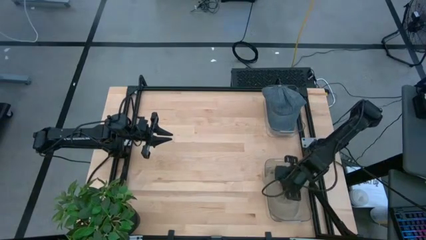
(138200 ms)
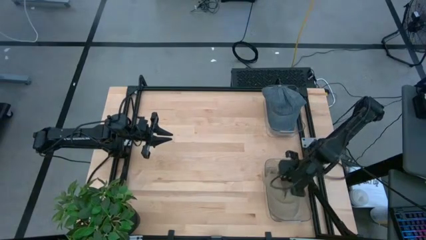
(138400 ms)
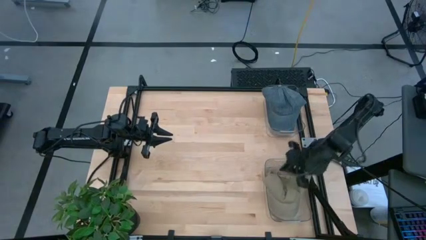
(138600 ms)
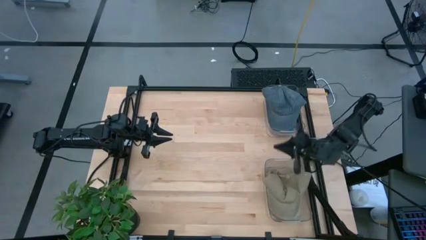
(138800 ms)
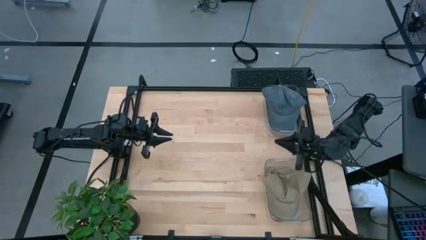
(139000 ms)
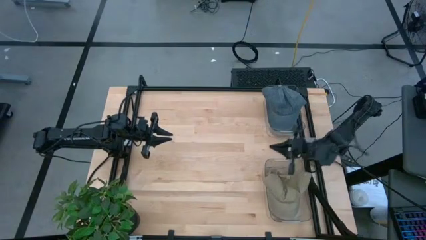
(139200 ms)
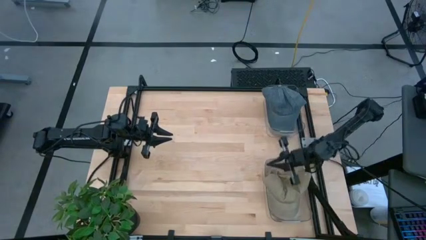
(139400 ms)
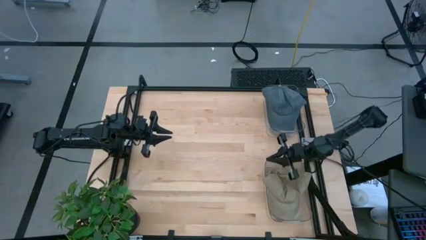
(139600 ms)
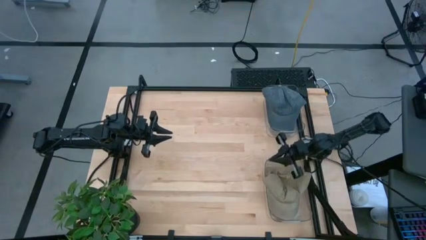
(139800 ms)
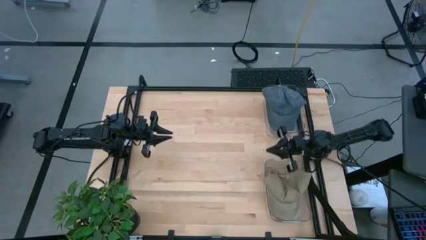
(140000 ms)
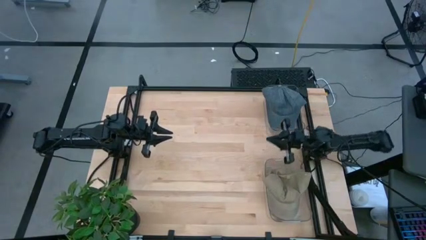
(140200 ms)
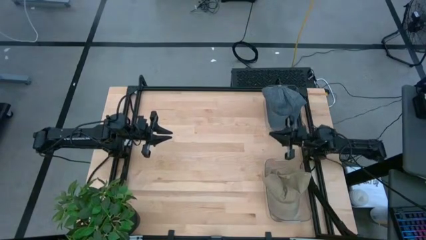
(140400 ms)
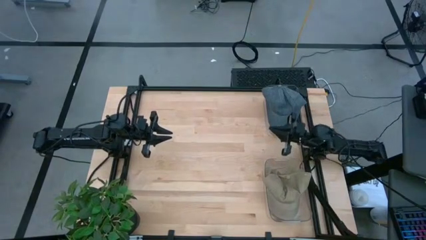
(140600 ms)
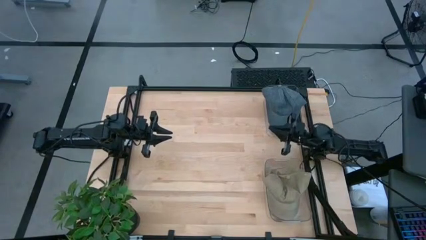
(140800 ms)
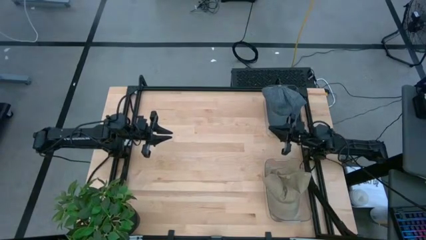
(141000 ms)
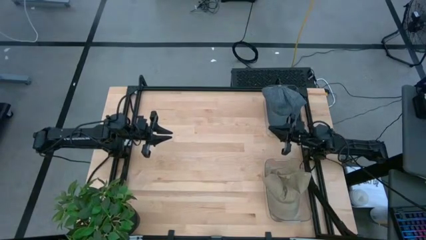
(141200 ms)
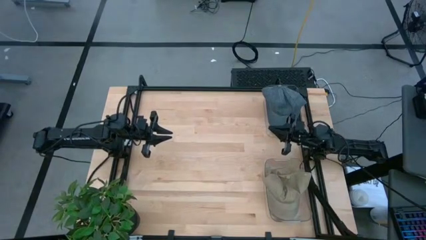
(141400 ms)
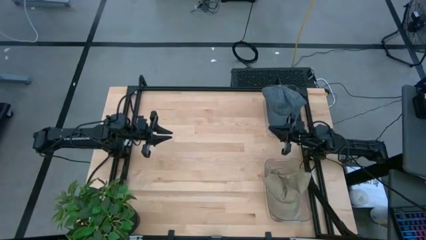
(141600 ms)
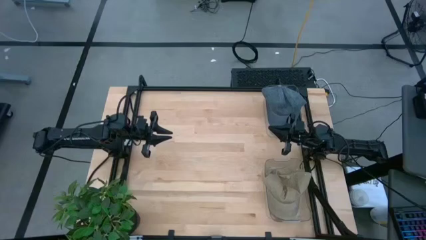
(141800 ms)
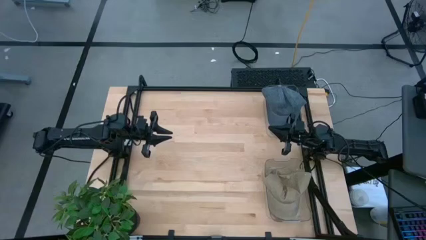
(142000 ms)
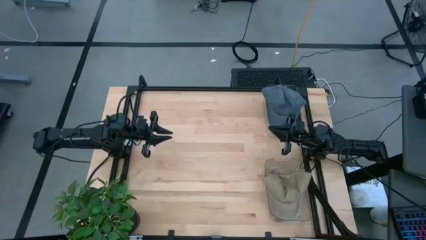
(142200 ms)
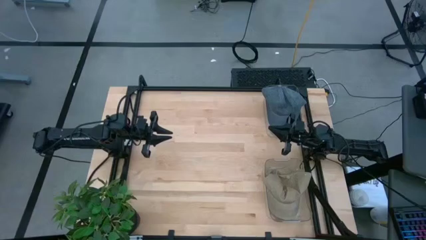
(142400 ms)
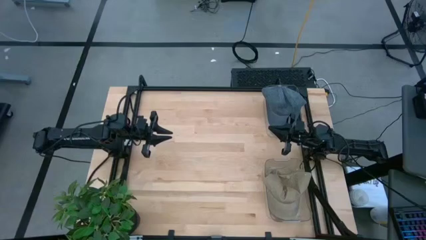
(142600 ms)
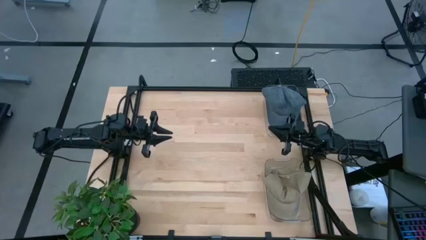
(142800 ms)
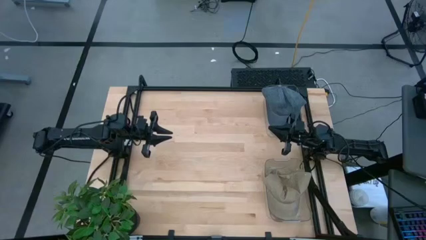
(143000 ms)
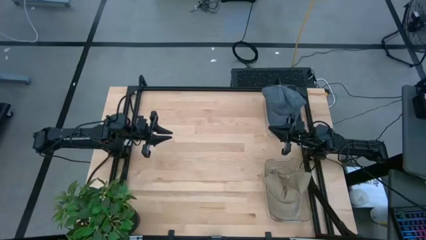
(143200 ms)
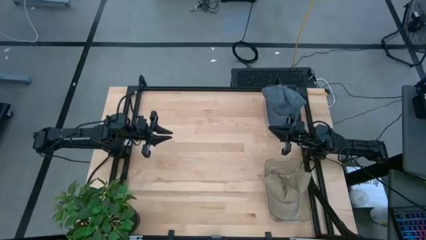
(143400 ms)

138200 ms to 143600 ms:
Task: Pick & Place hat
Return to Home Position

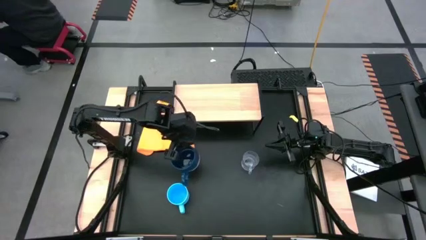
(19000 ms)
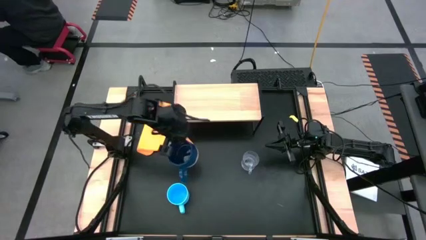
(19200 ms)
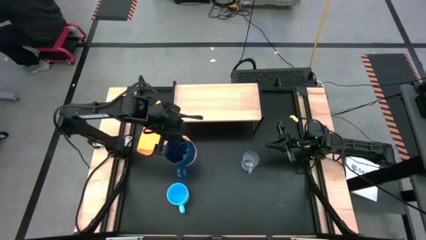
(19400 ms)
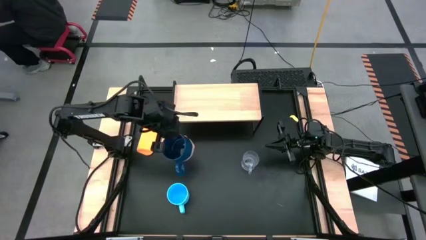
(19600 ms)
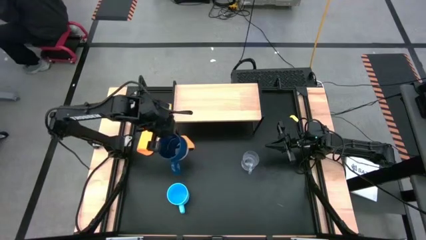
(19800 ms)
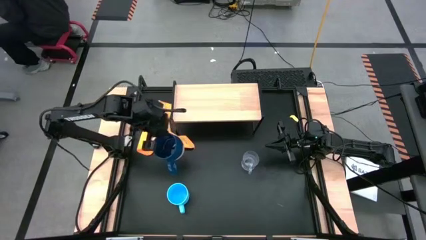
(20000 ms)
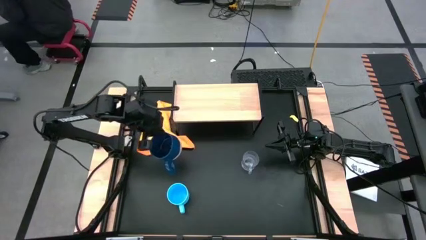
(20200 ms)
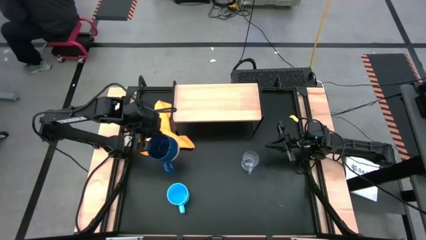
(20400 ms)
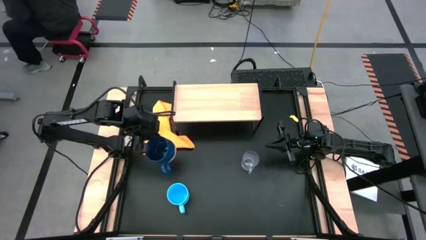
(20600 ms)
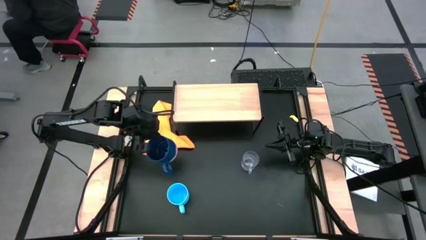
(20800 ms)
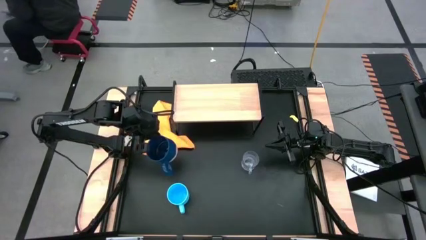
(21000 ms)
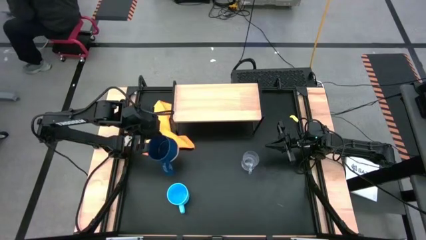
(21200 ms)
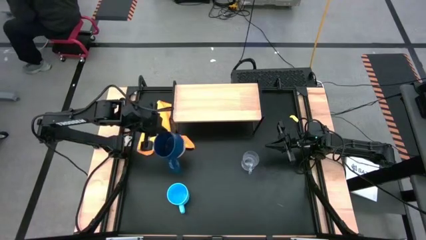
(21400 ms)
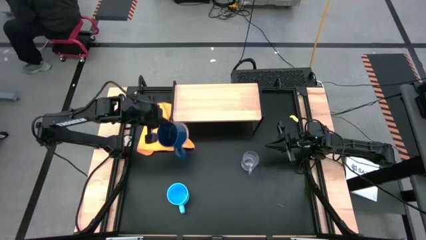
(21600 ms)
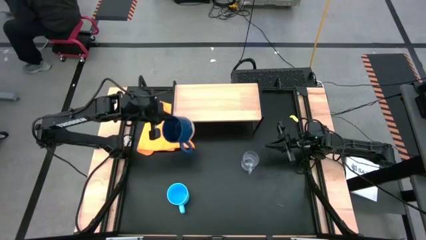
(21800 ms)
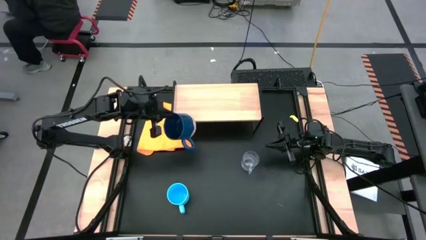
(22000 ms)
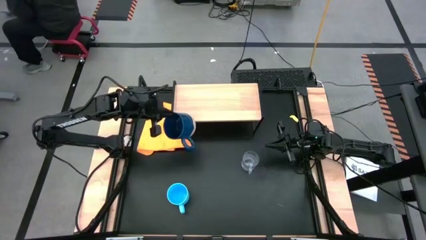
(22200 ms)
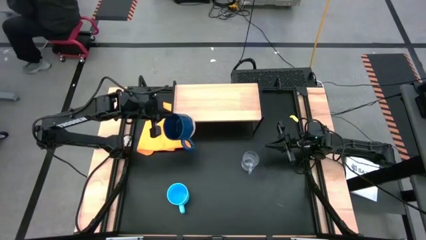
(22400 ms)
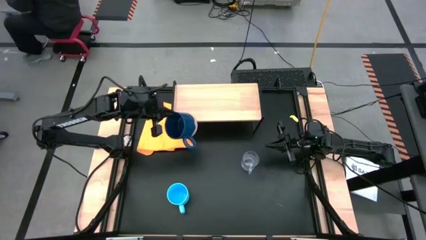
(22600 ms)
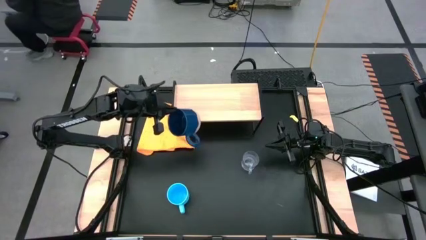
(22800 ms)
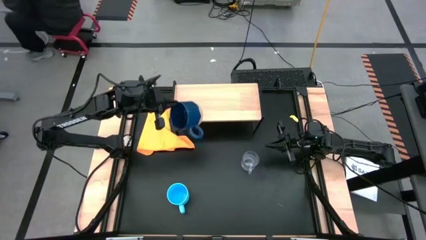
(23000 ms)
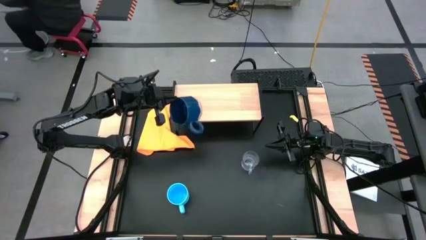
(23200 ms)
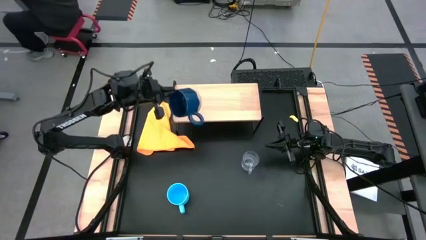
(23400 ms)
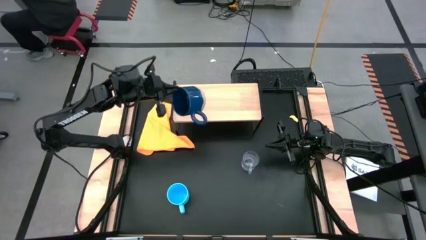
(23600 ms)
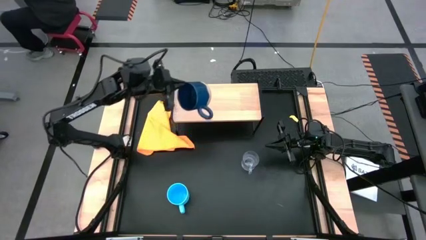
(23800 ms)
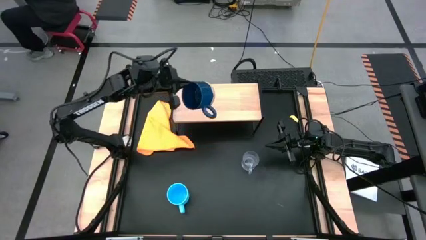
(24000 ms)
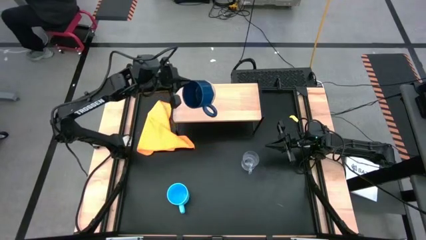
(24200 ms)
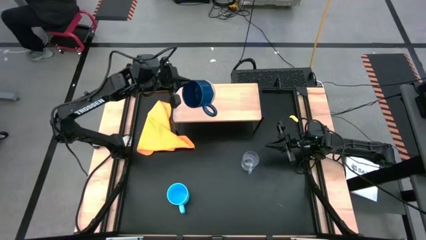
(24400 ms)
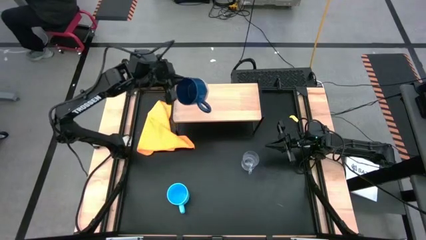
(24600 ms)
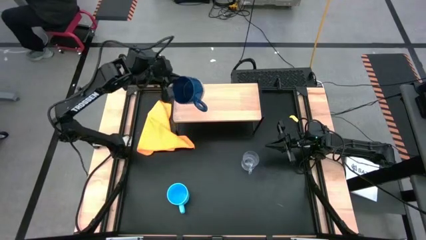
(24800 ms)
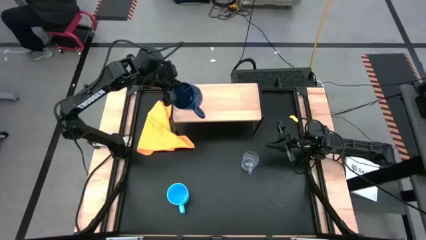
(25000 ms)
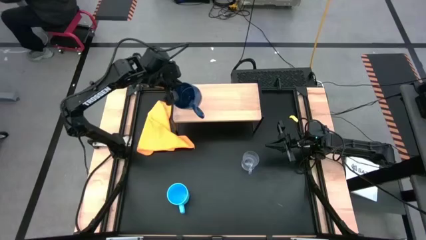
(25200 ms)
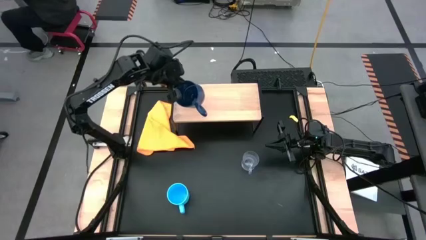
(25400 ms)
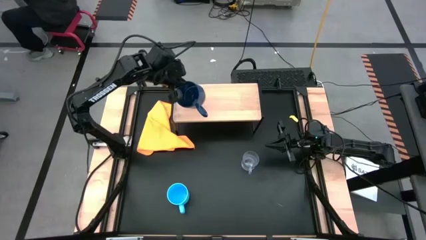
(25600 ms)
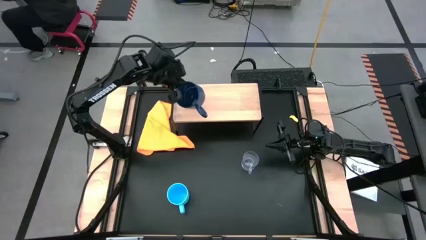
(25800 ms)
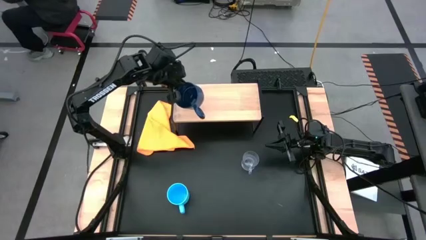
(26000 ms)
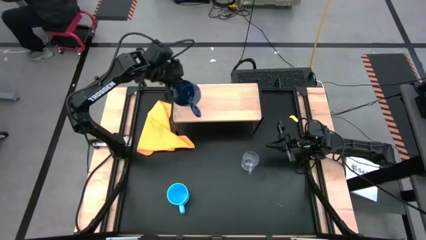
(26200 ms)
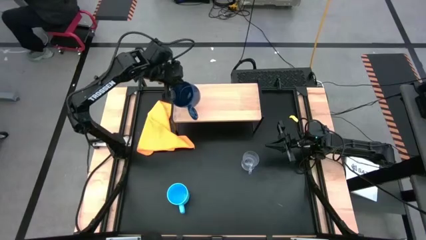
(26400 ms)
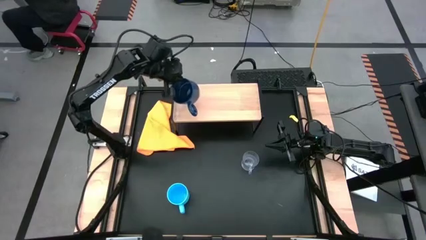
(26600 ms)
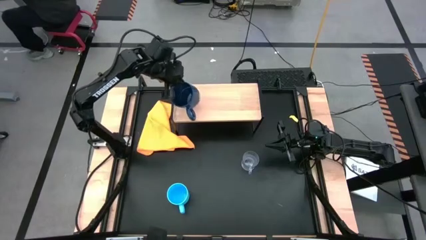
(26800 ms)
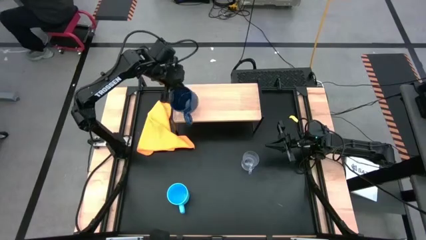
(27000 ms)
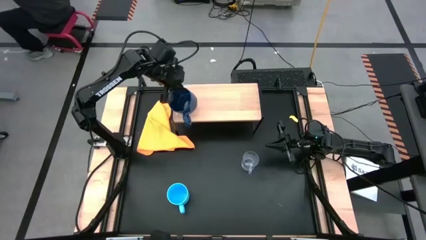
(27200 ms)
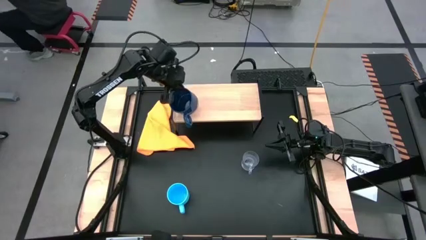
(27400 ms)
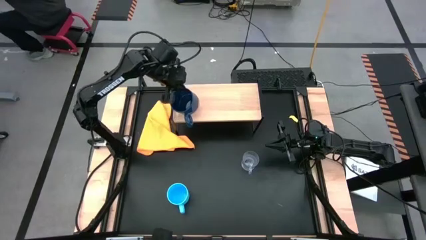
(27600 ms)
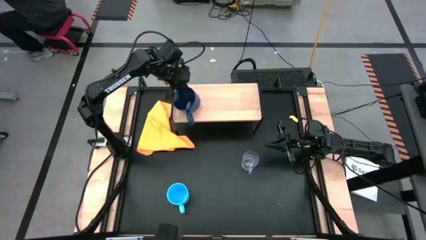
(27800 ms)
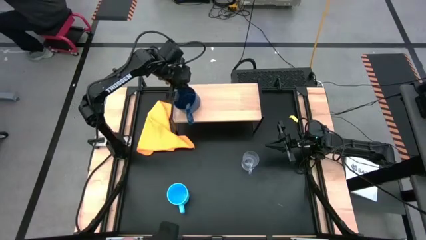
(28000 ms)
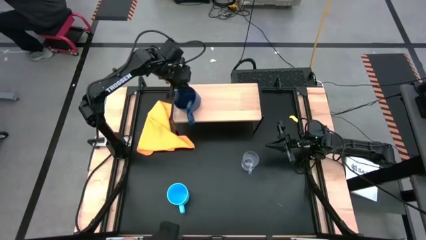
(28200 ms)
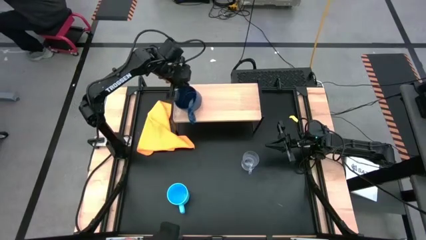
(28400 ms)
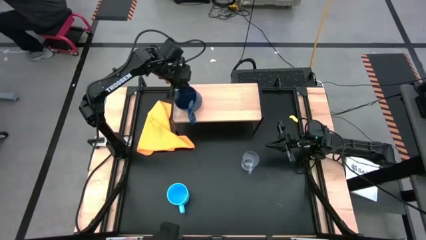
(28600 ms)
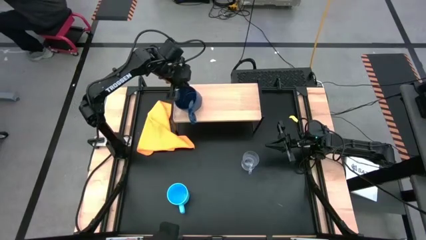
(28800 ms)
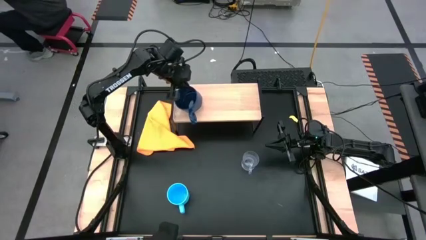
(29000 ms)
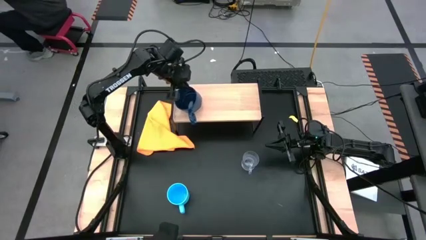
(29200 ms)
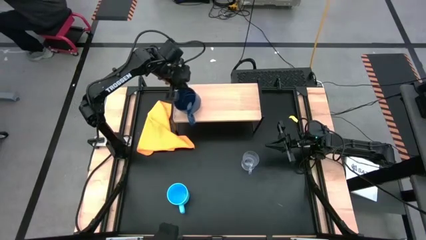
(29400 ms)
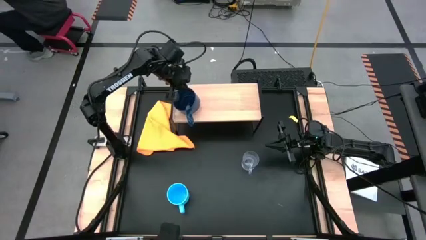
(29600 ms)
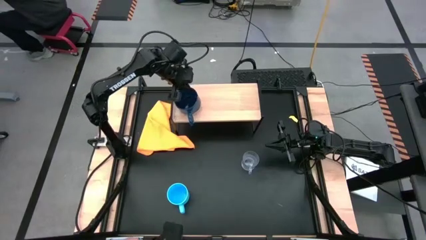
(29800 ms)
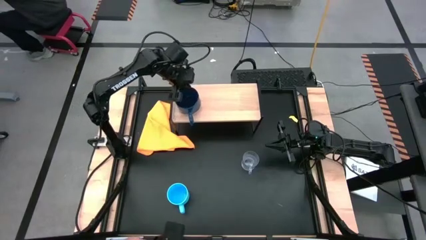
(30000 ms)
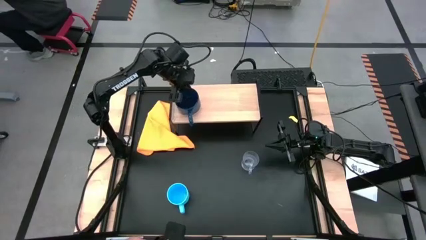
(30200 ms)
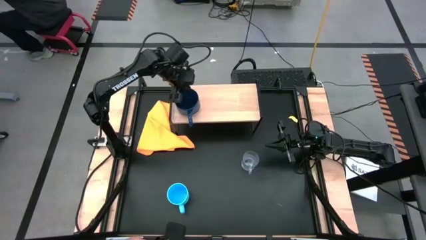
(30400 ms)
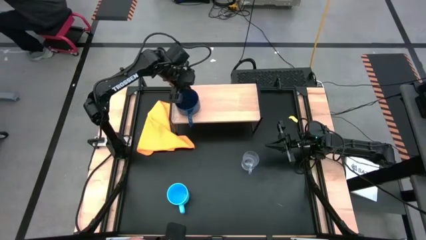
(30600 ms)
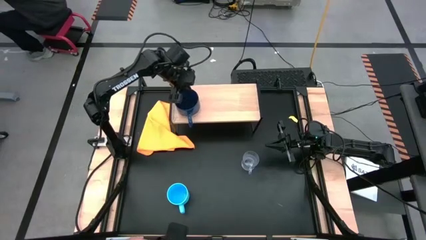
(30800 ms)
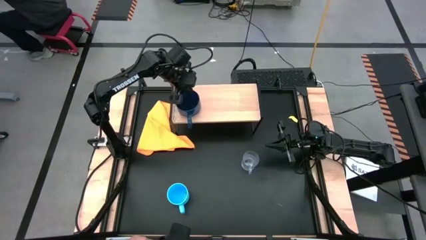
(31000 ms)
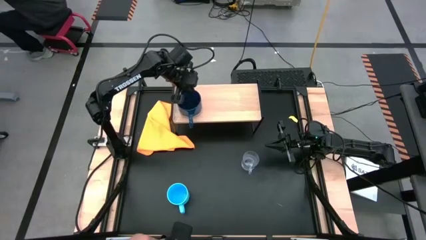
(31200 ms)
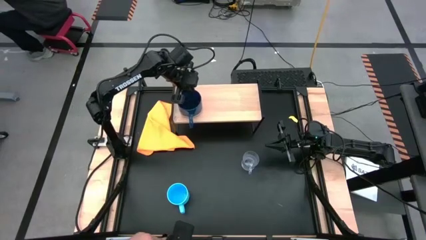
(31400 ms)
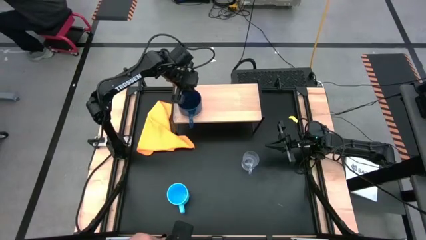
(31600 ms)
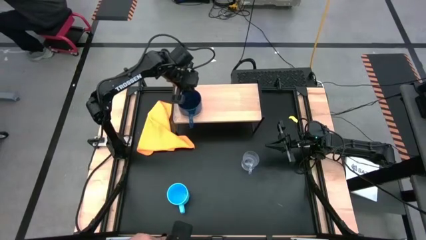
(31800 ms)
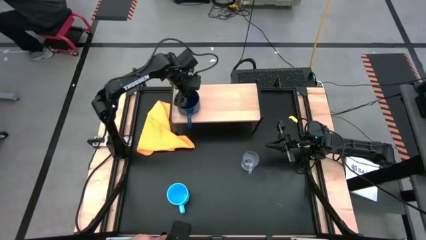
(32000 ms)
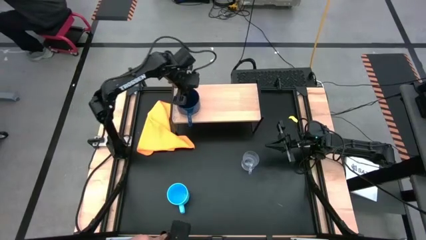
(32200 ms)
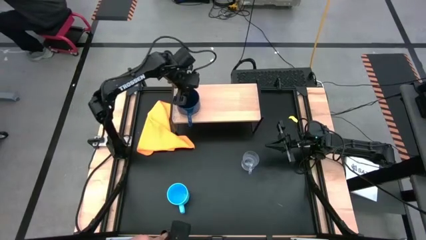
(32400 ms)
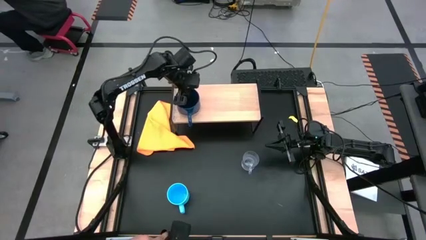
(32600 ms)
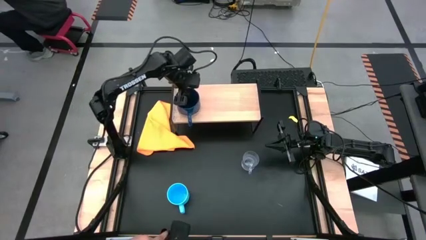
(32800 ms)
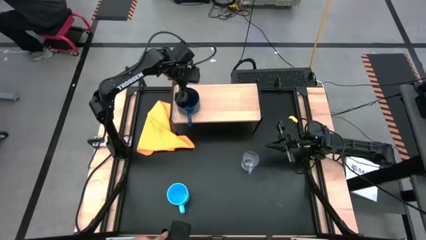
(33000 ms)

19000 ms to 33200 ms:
Task: Stack small to large cups/mugs on shelf
Put the dark blue mug on the shelf
